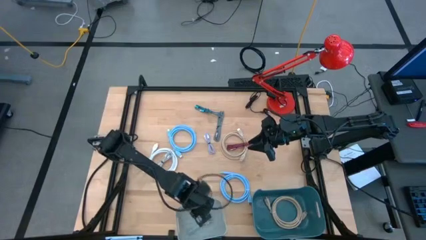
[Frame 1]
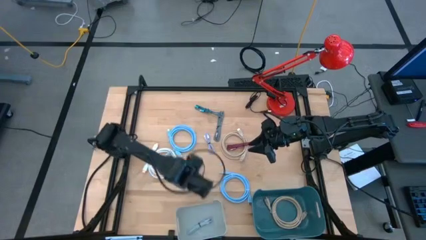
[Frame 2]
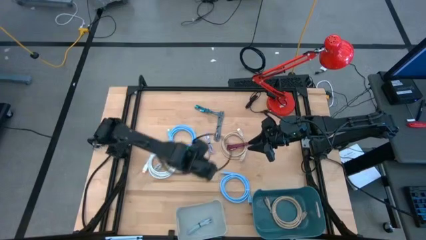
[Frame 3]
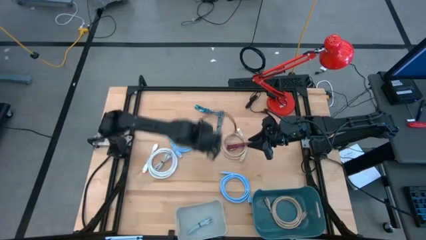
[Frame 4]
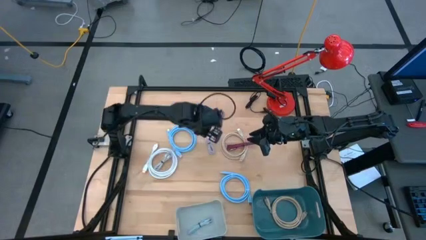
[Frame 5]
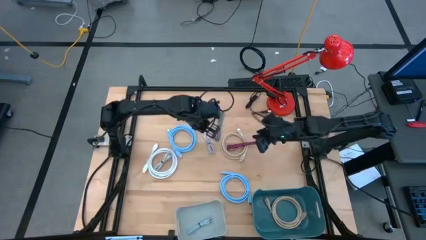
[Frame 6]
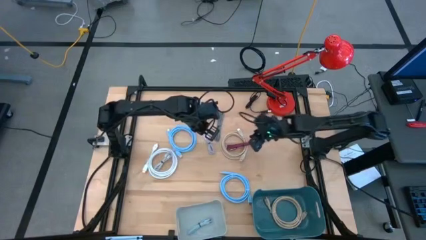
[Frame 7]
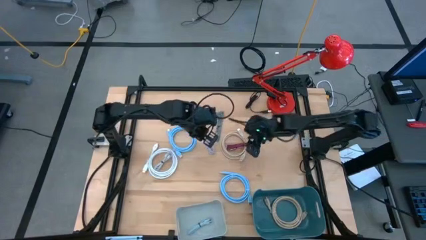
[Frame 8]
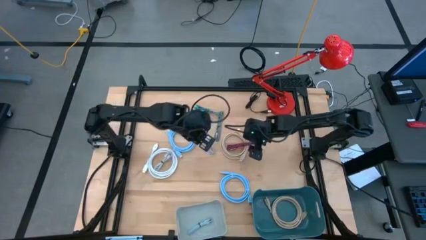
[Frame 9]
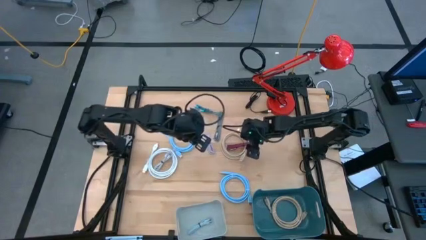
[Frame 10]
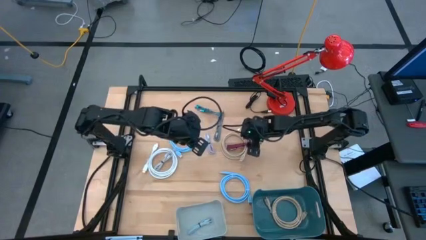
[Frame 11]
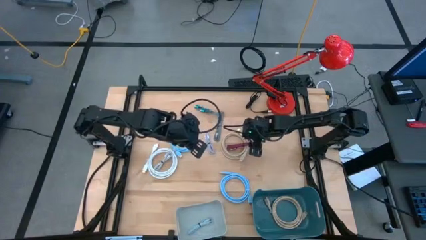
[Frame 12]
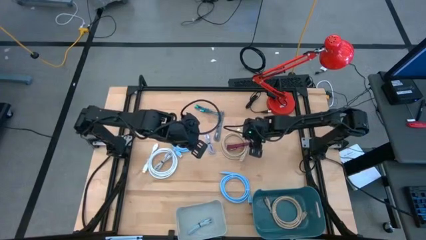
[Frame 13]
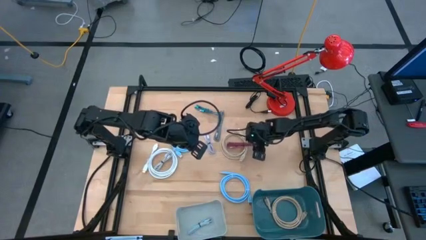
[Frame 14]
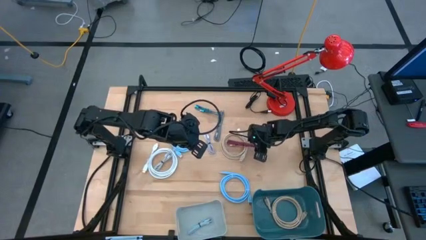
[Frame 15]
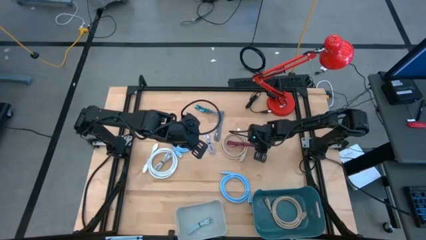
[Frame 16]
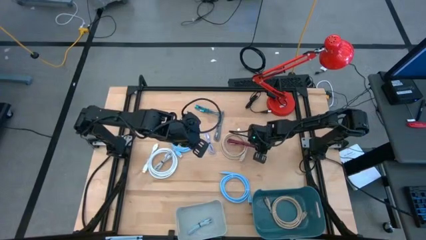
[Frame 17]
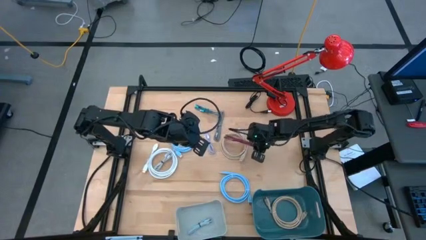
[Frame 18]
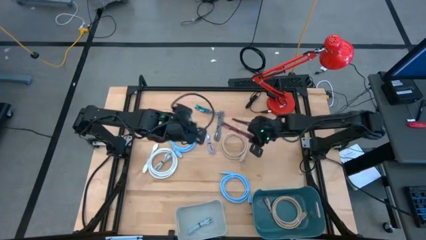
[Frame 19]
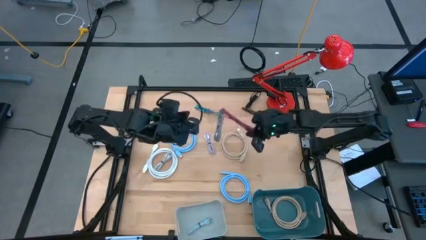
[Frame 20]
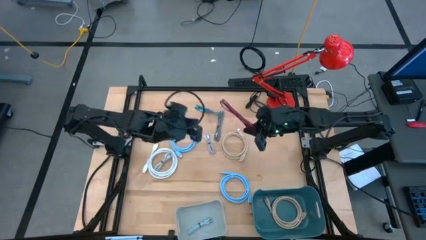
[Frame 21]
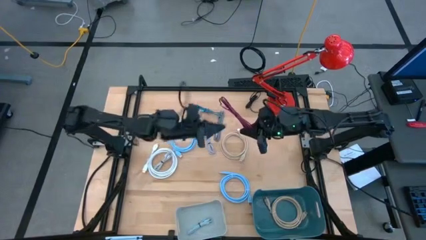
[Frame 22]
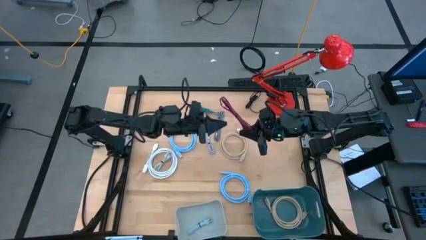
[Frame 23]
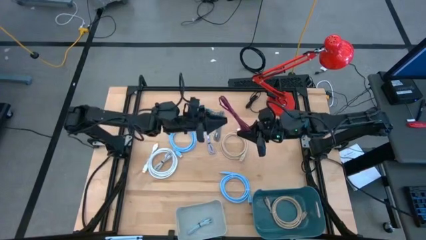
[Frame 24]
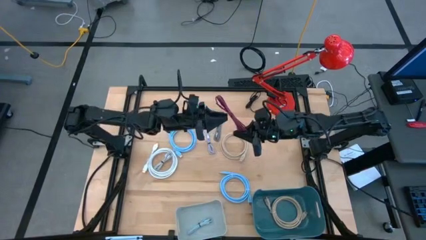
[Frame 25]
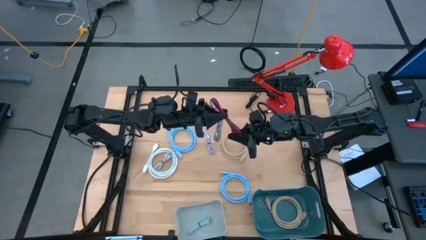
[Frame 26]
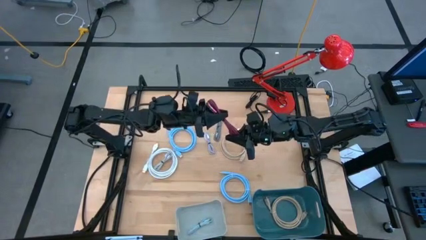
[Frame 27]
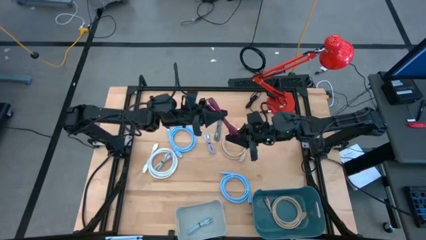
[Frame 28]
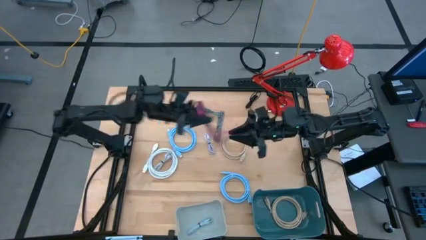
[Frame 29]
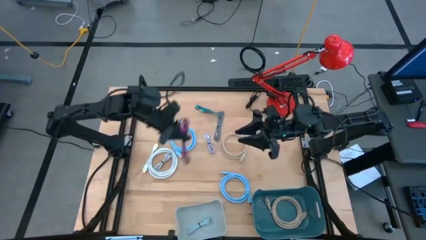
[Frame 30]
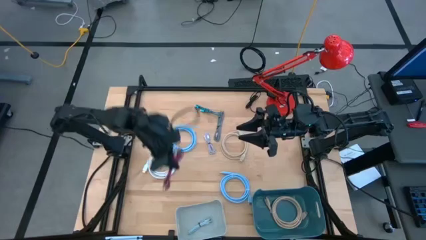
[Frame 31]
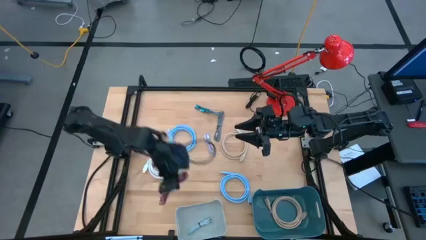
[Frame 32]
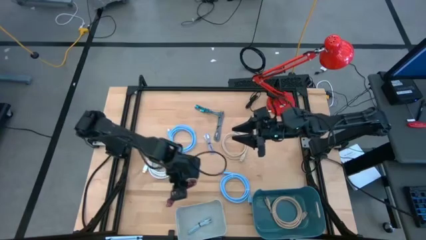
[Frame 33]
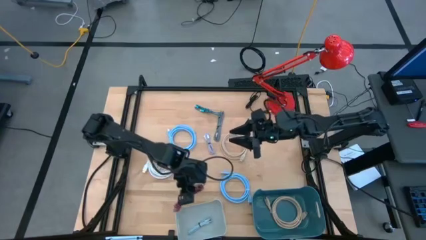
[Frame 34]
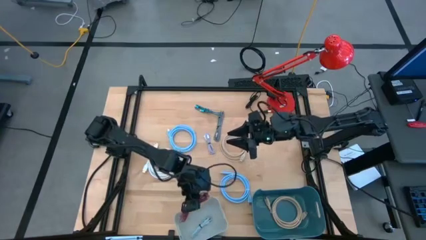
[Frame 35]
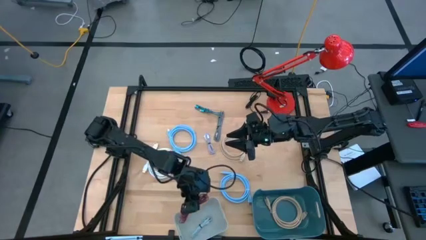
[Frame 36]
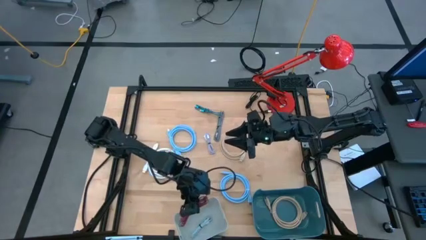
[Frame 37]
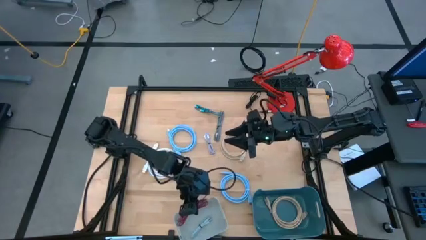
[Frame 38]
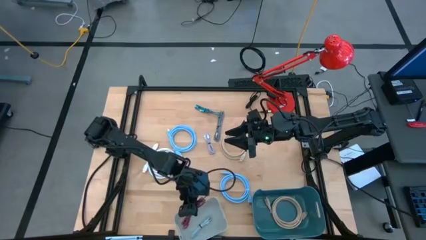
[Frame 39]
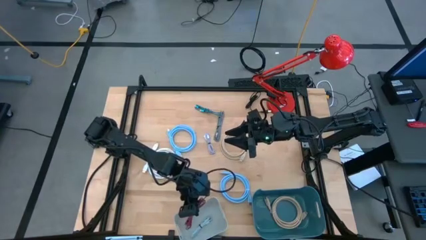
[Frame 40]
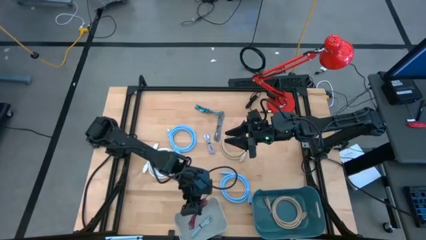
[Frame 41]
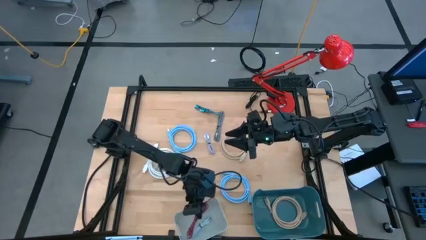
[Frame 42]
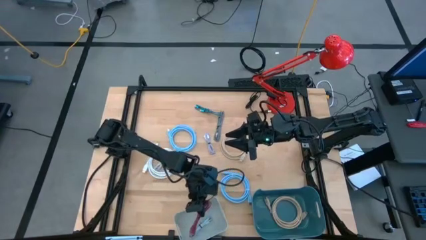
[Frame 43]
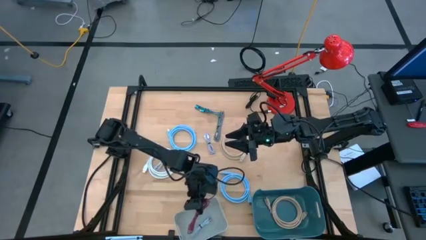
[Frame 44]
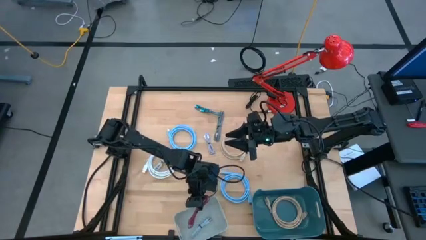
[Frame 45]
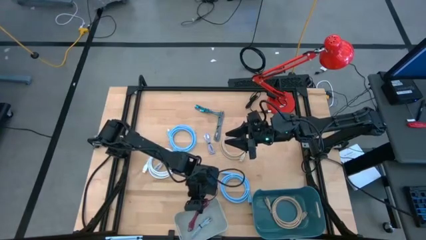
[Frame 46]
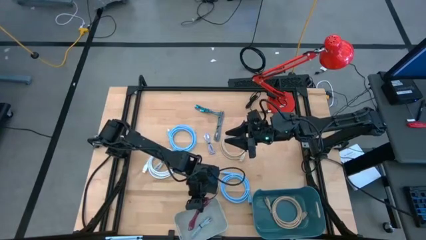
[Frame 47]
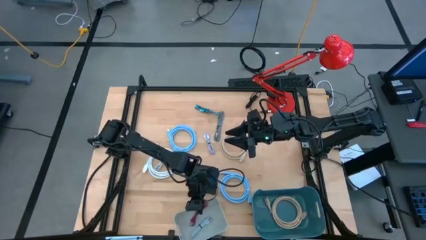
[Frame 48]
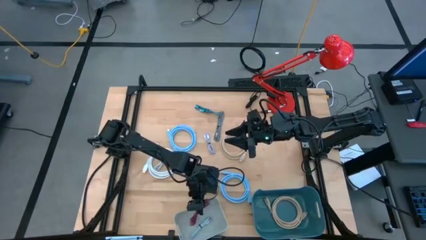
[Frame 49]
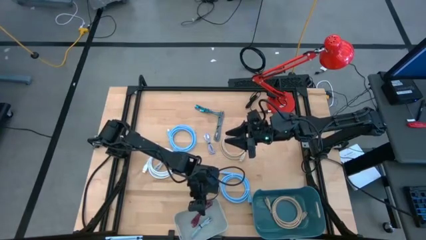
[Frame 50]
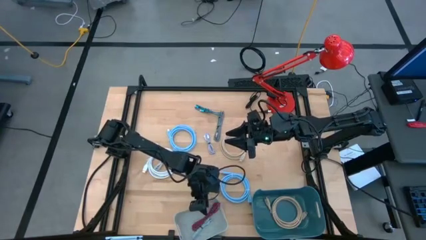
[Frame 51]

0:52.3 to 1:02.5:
Task: Pick & Place USB Port
Put the red patterned charger cable into the gray bin

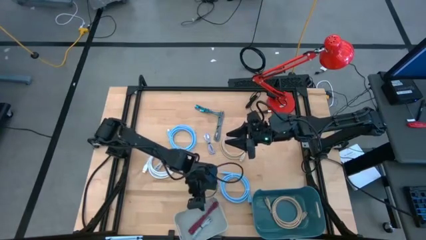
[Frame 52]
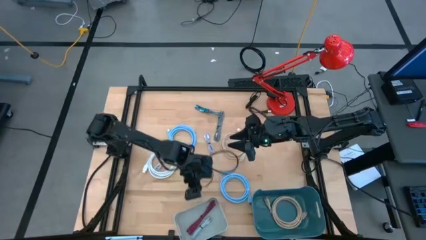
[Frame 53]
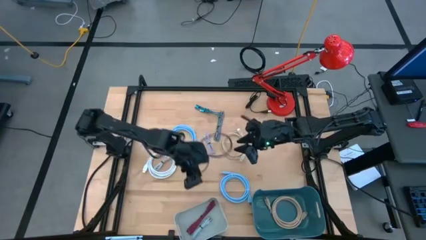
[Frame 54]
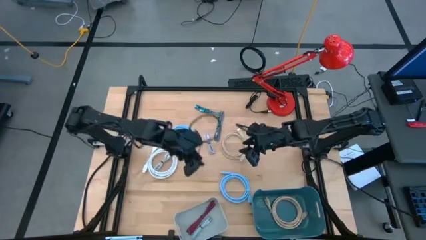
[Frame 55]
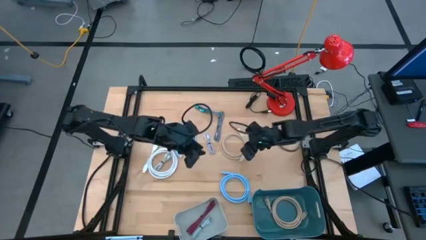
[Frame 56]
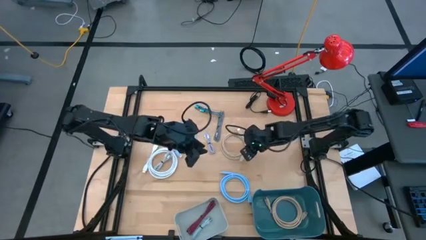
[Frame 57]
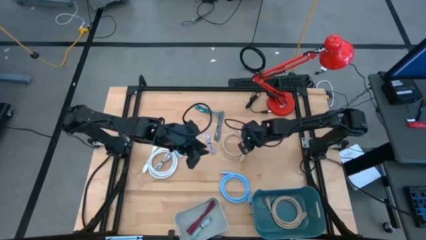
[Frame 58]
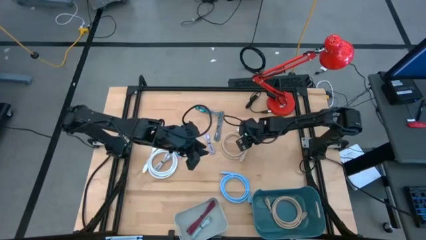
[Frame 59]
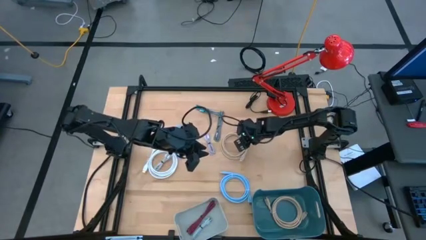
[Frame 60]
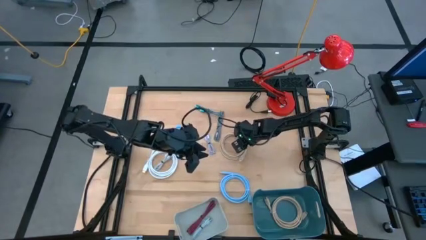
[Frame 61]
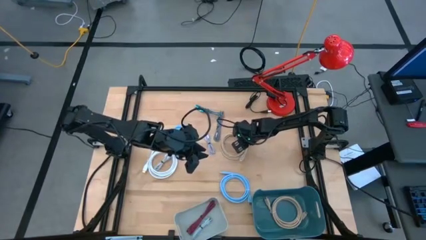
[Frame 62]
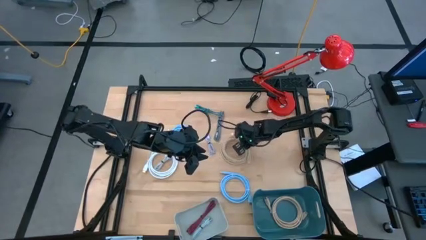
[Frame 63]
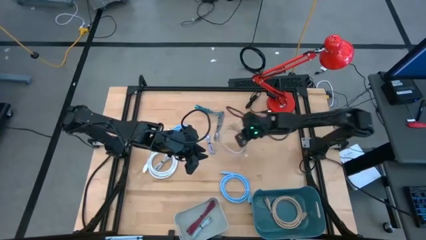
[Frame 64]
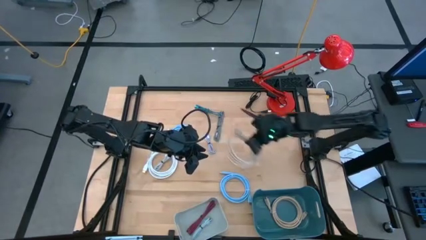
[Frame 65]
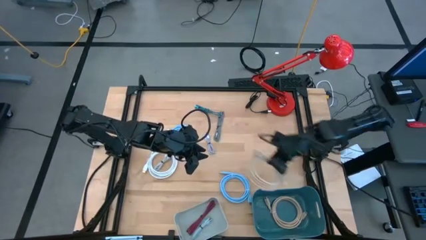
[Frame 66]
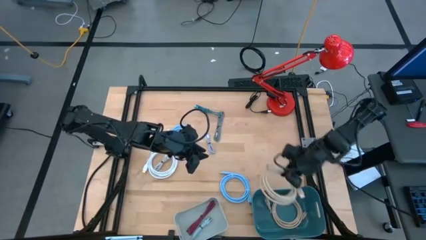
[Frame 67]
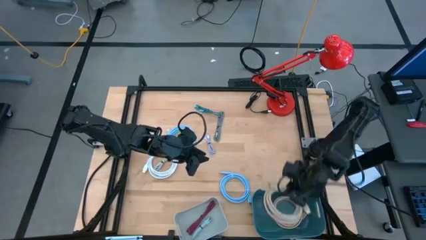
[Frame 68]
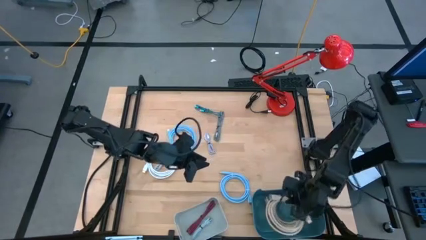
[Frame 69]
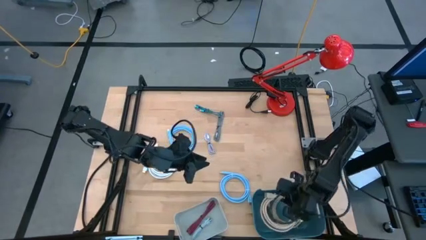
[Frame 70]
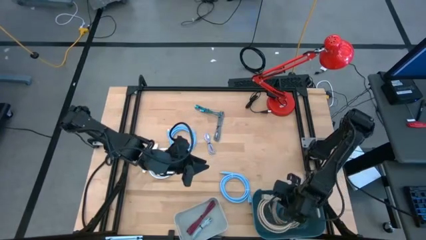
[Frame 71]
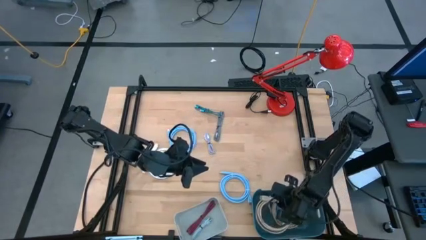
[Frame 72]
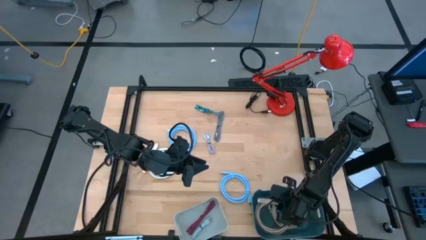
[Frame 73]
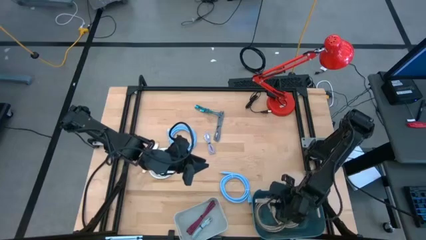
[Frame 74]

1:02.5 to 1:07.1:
Put the brown display cable into the blue bin
